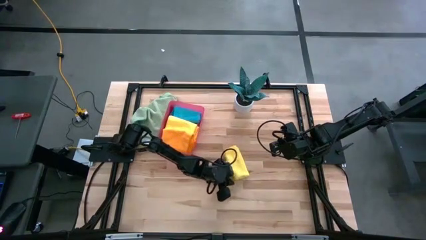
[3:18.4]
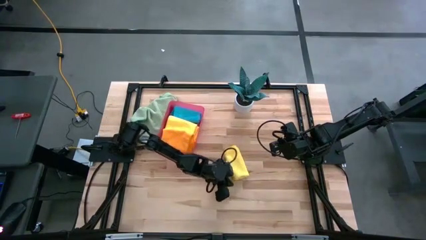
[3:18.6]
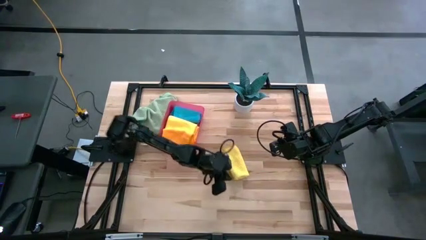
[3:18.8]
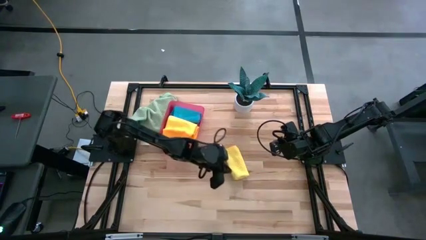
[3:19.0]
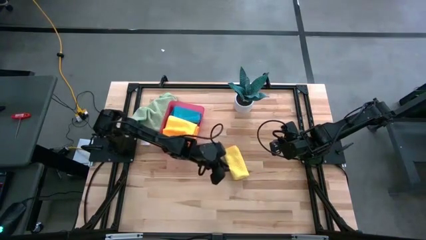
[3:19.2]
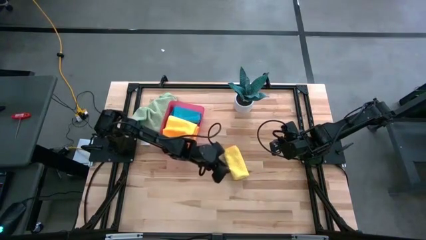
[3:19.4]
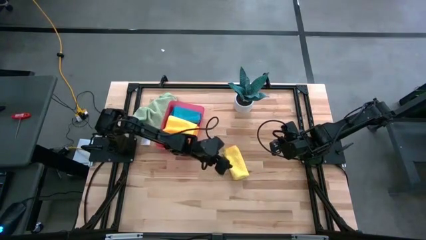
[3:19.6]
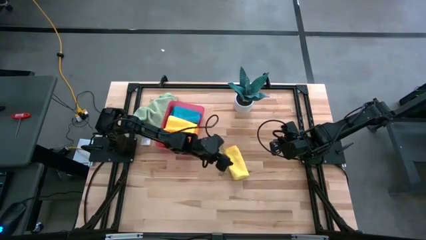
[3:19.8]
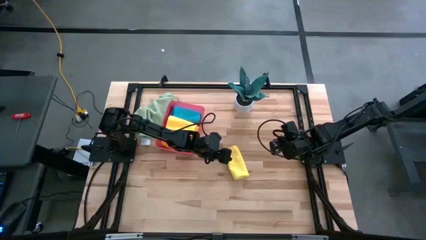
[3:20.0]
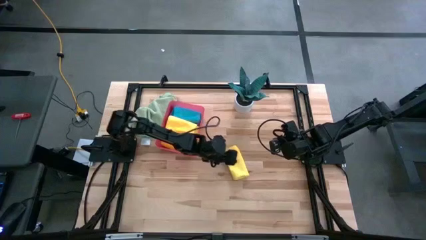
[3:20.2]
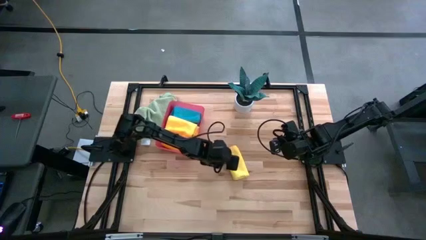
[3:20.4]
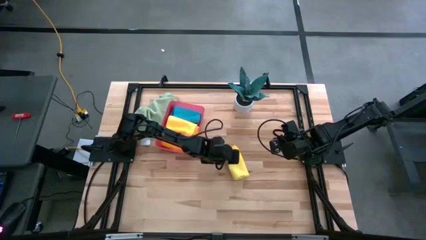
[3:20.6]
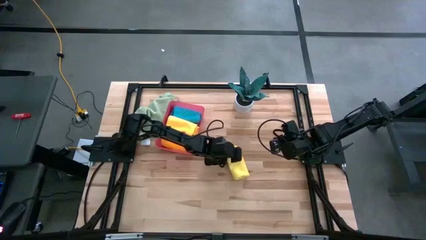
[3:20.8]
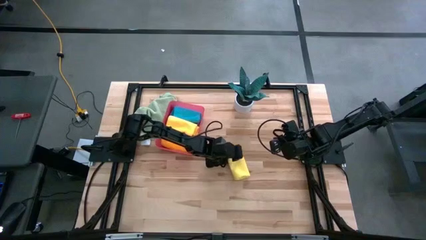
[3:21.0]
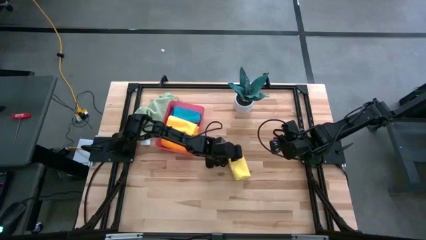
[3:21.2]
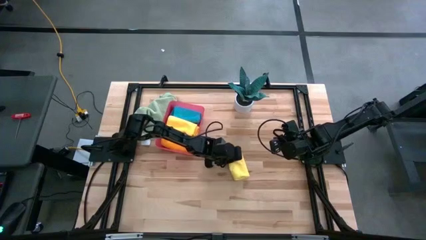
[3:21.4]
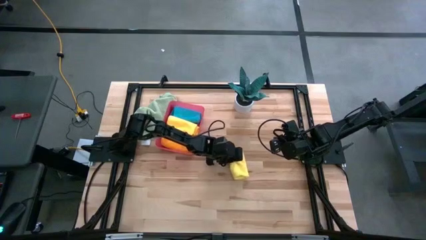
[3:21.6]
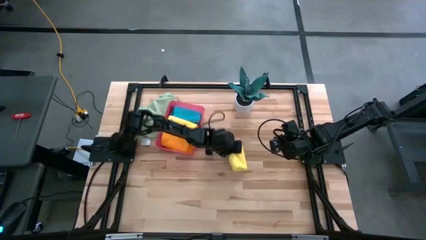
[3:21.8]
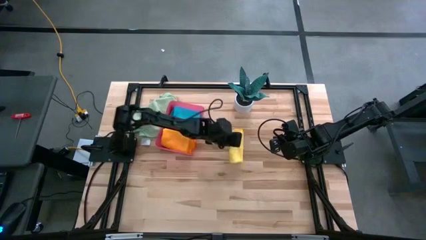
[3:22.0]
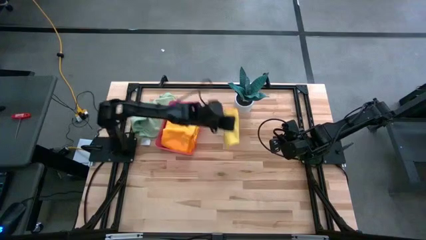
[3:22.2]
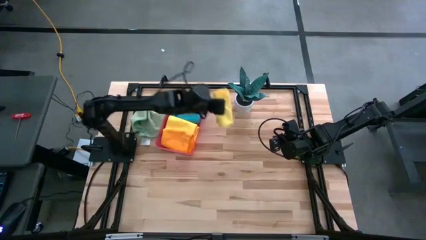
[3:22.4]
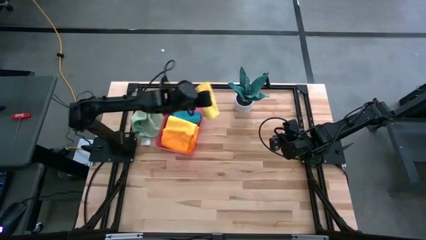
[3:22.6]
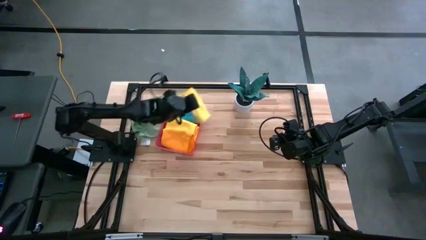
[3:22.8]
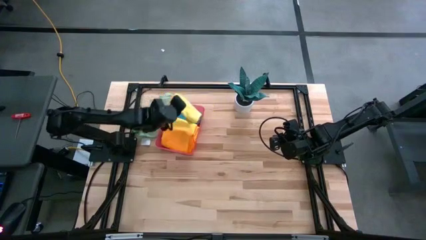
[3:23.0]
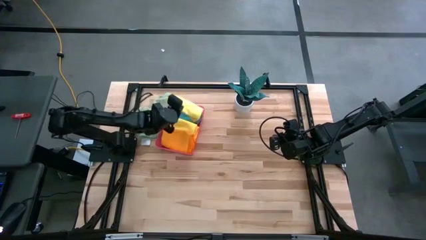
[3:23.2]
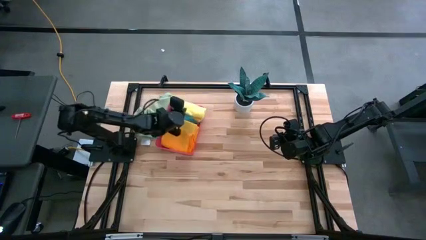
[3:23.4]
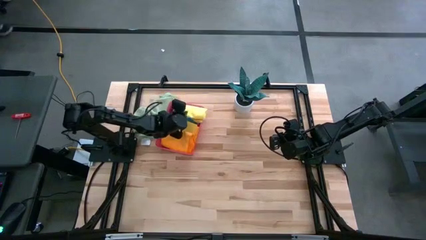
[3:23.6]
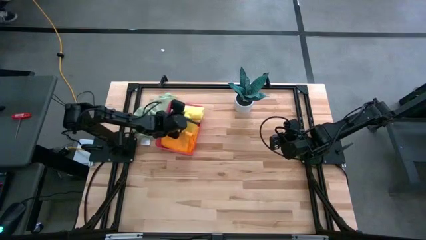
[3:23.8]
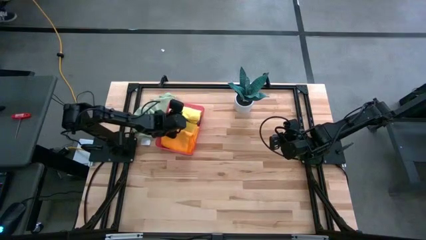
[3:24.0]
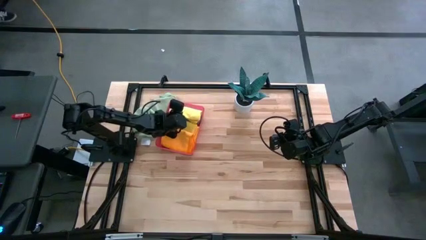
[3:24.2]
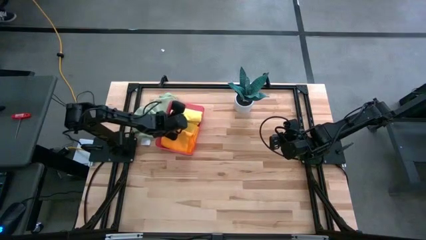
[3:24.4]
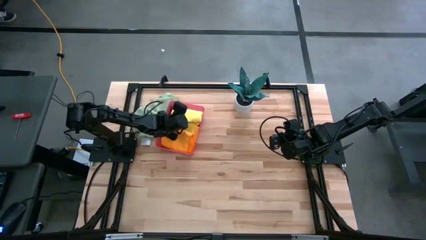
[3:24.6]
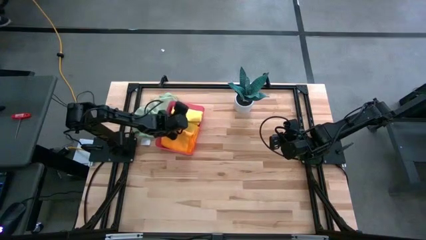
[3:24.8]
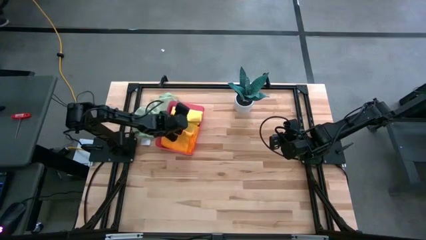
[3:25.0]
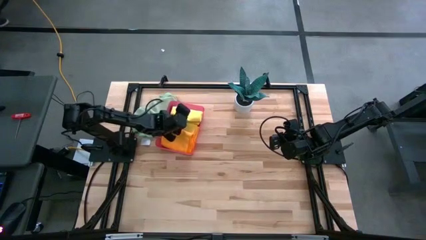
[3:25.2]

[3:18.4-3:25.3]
Task: Fold microfiber towels
Put the yellow microfiber cloth into the pink bin

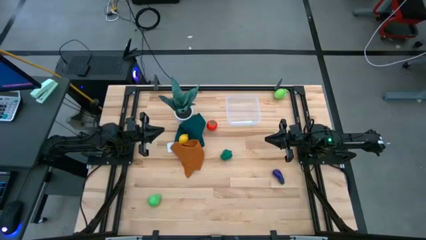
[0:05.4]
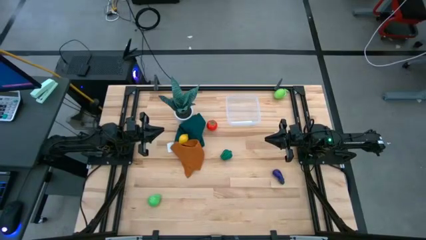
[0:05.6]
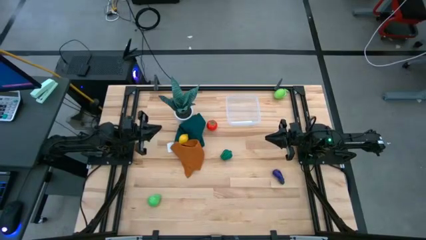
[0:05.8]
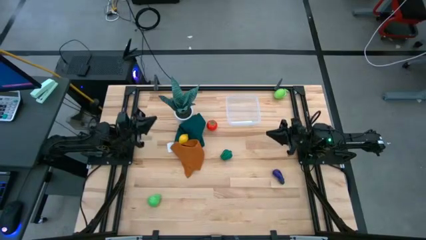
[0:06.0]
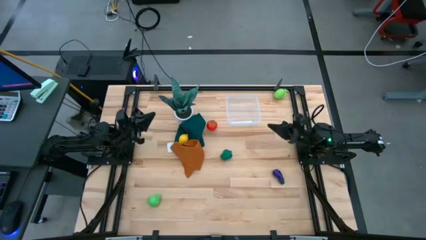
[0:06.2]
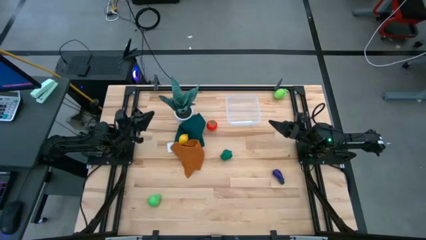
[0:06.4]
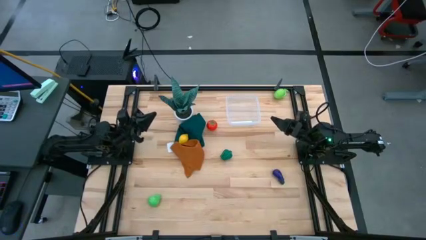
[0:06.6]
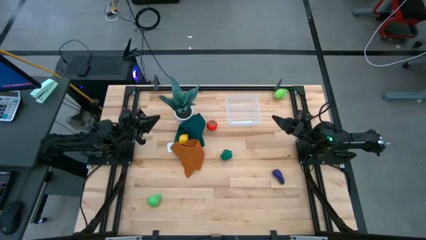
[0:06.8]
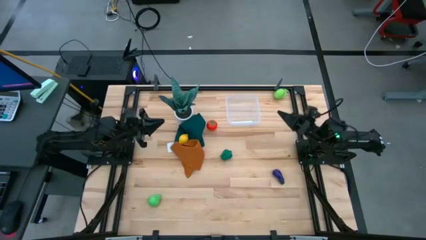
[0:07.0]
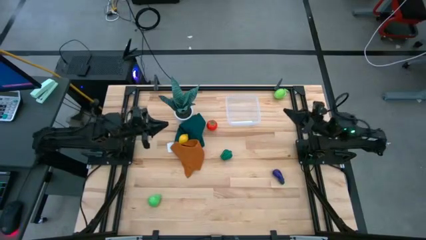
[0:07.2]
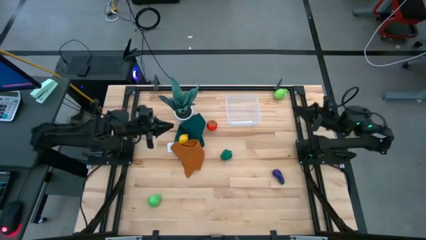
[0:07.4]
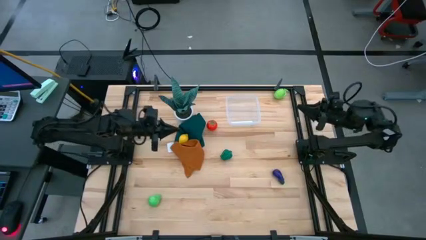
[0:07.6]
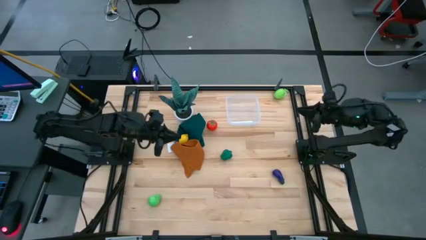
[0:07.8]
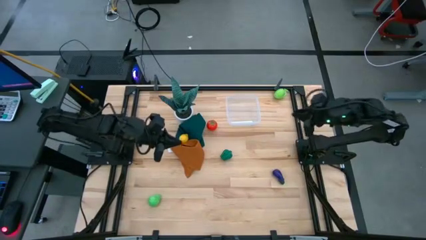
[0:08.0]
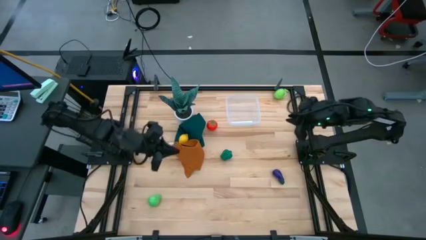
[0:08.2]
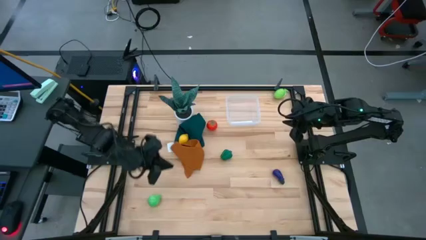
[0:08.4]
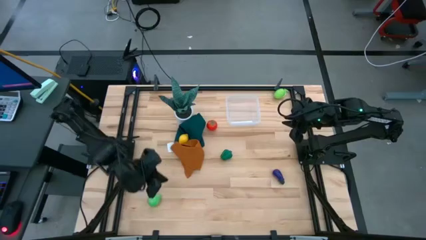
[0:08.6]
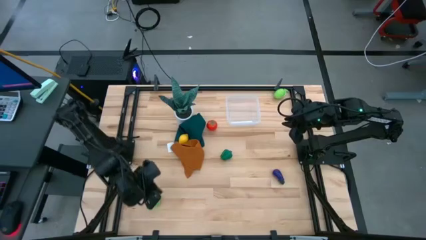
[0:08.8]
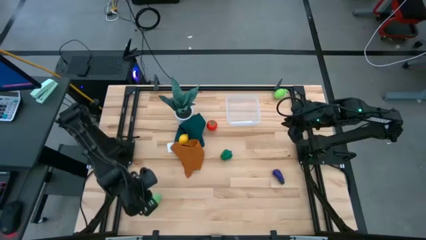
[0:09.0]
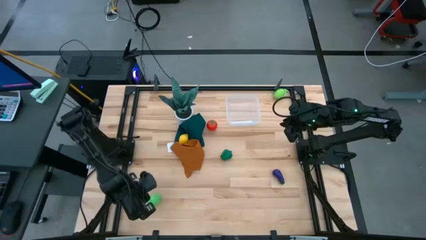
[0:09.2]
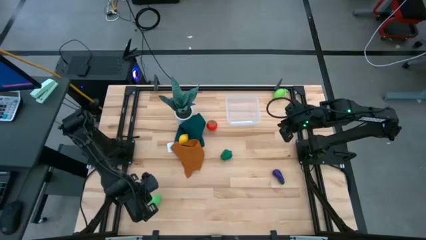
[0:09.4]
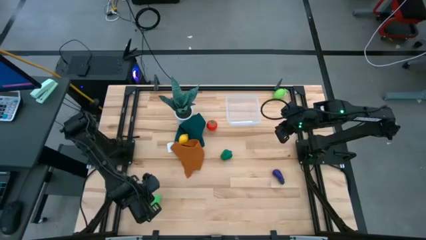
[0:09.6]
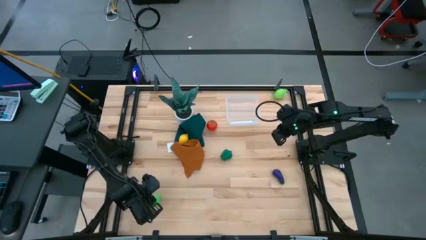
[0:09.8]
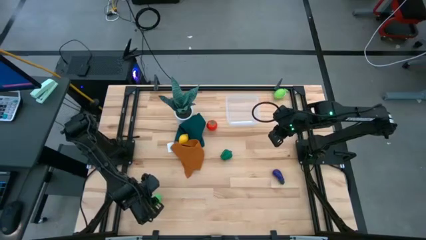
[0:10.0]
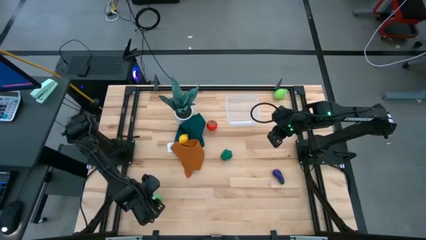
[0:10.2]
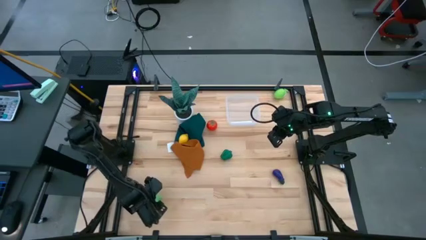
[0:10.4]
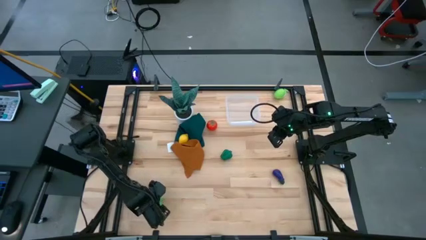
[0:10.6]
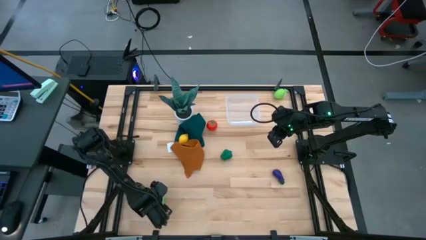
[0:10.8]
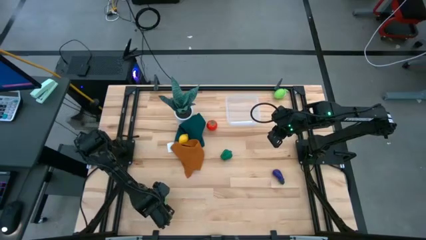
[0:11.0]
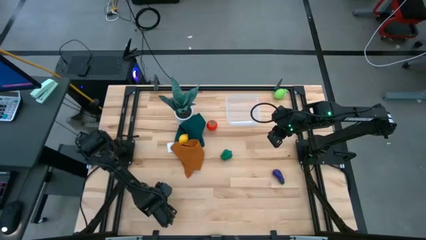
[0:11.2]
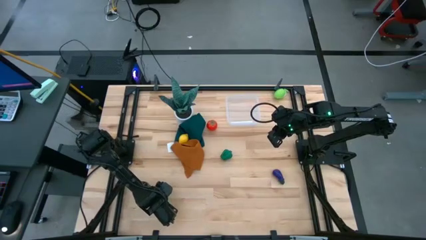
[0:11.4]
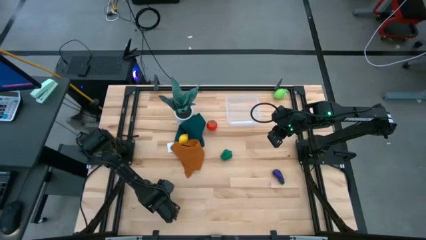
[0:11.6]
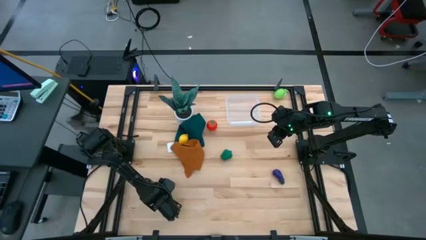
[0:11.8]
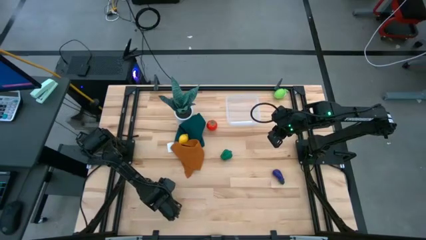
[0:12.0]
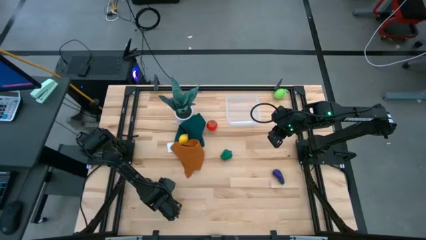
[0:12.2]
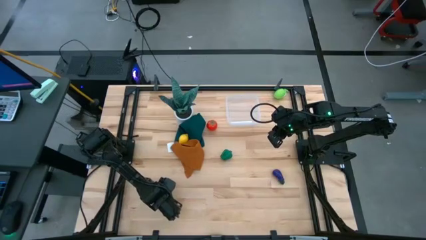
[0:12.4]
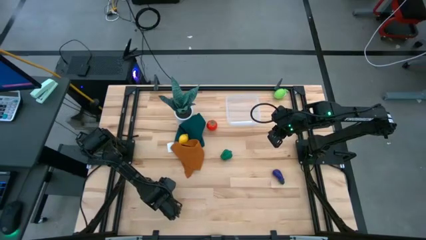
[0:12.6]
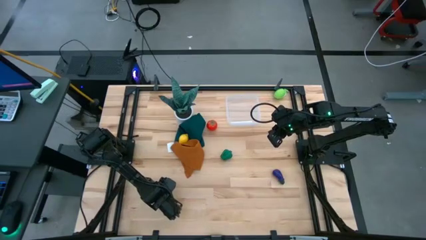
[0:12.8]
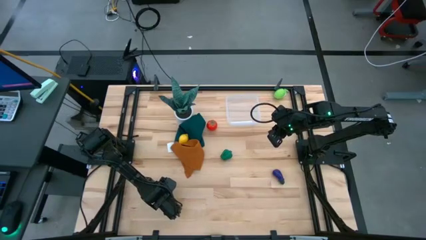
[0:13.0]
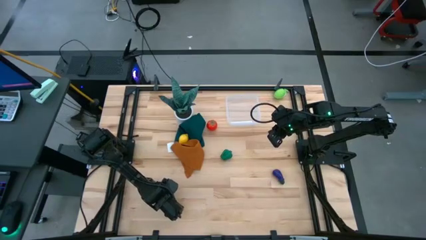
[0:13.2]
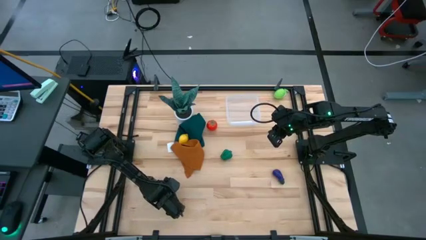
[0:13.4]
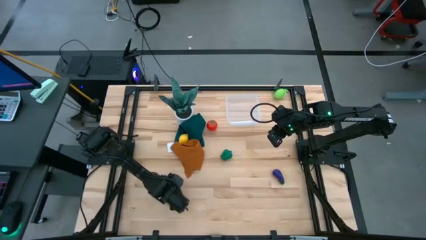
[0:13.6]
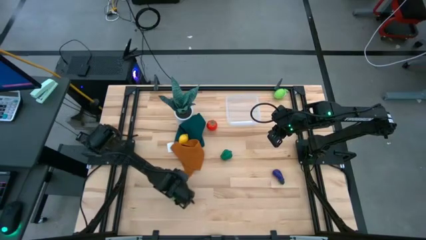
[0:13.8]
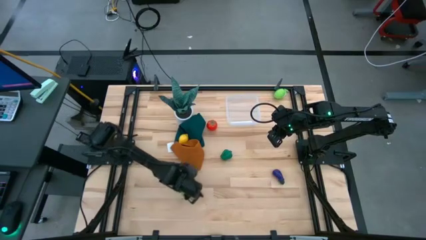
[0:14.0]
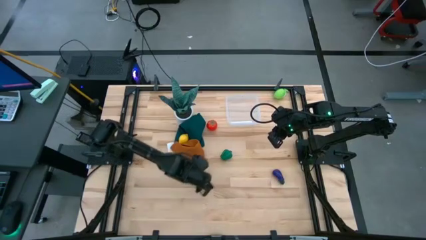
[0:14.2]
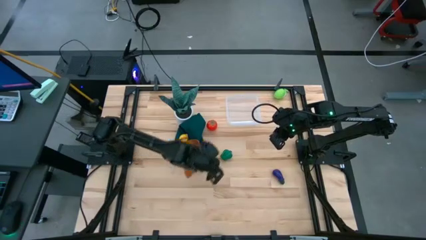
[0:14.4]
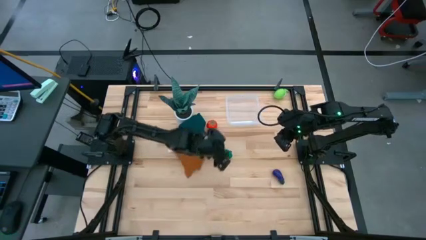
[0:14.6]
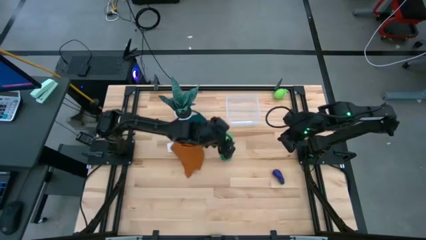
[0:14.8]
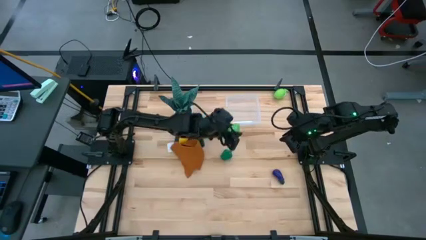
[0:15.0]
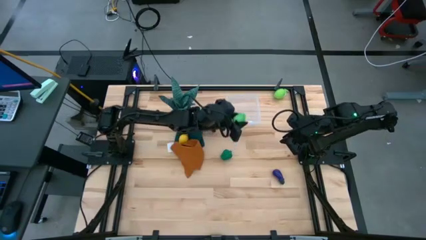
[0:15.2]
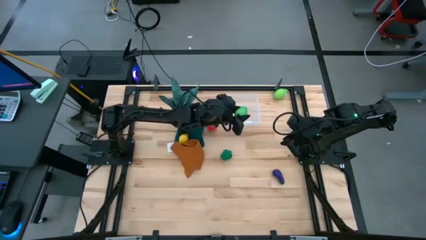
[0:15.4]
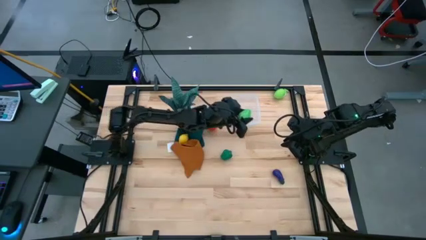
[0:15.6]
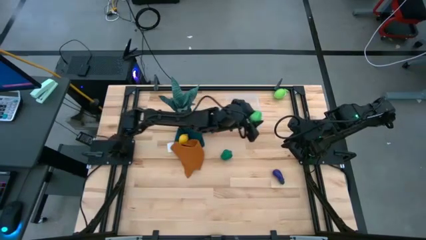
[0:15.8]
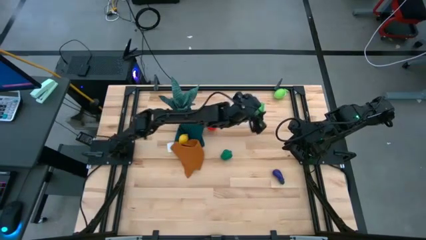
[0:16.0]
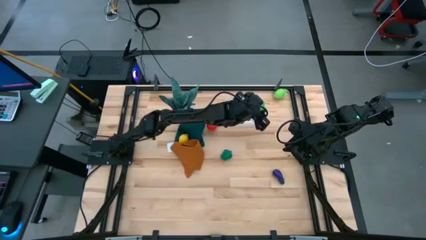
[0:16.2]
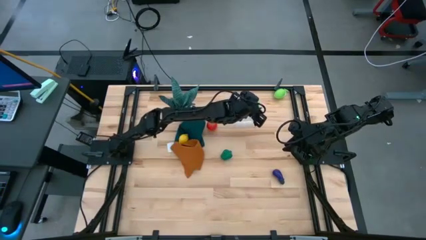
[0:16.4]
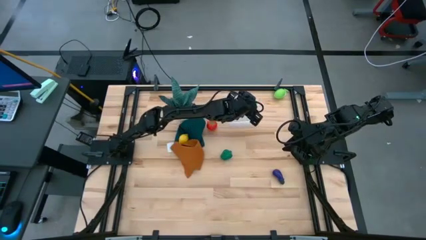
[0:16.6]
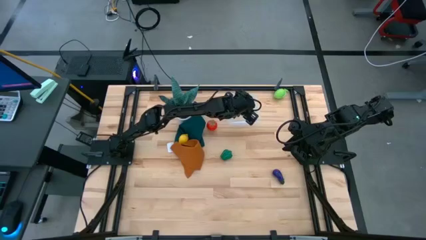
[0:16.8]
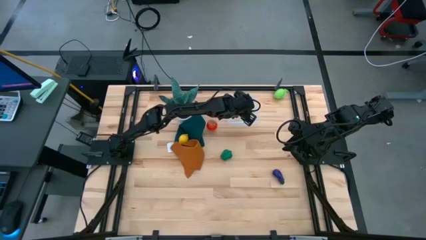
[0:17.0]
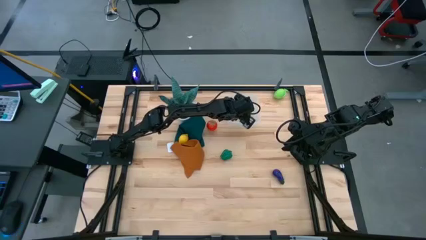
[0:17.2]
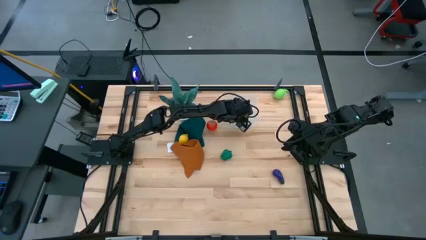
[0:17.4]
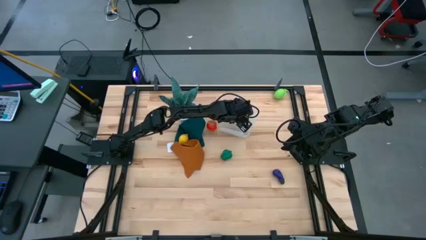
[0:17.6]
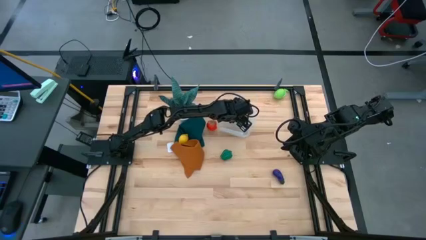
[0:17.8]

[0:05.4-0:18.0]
Task: Pick and placing Produce into tupperware
Put the green papaya into the transparent bin
